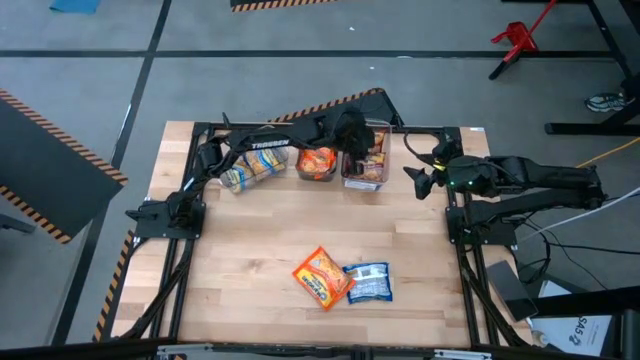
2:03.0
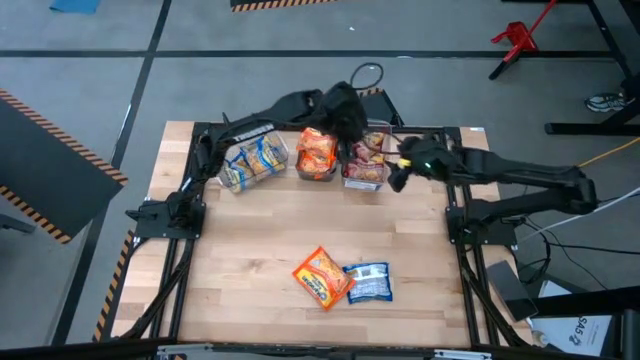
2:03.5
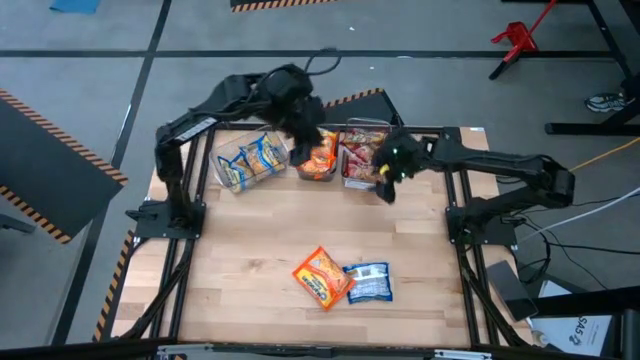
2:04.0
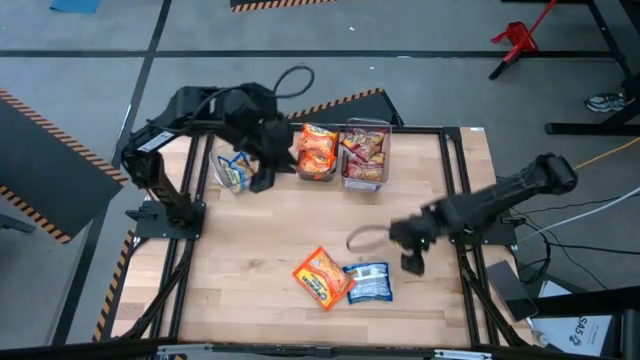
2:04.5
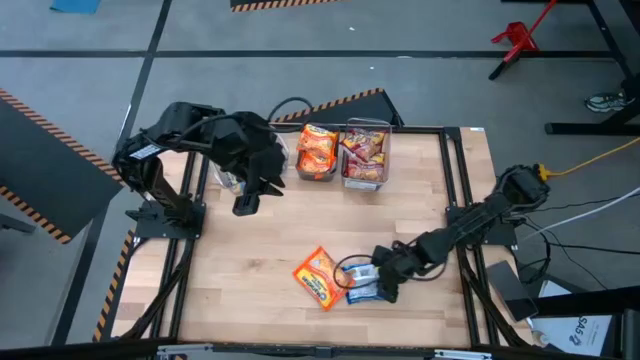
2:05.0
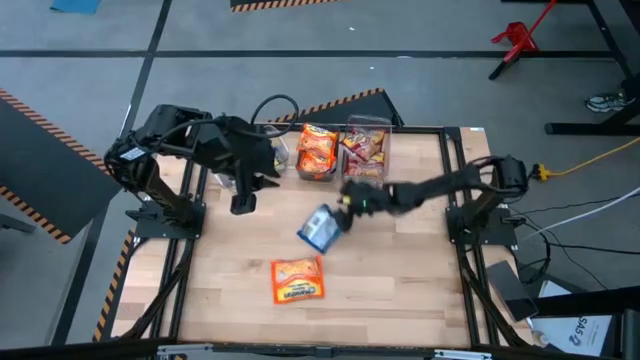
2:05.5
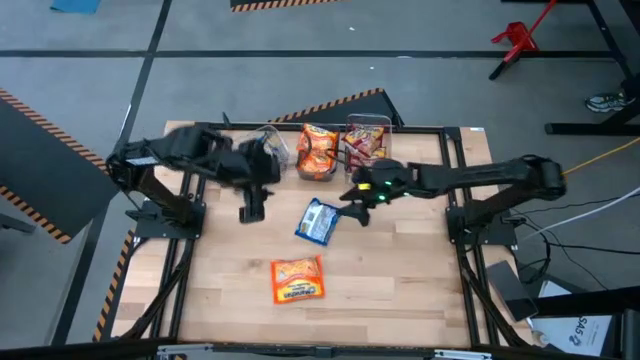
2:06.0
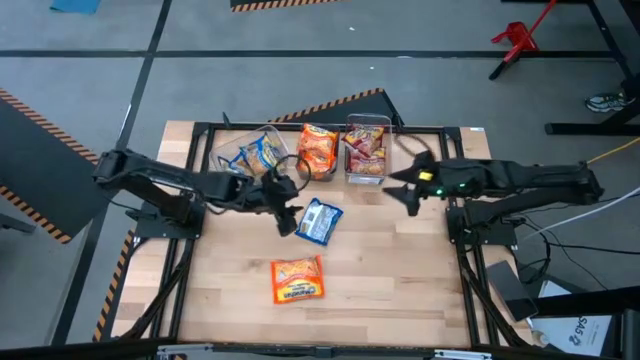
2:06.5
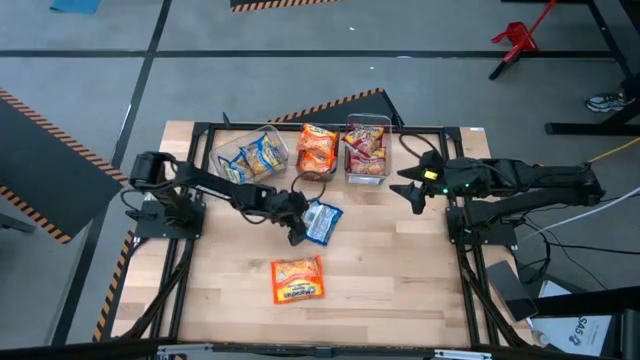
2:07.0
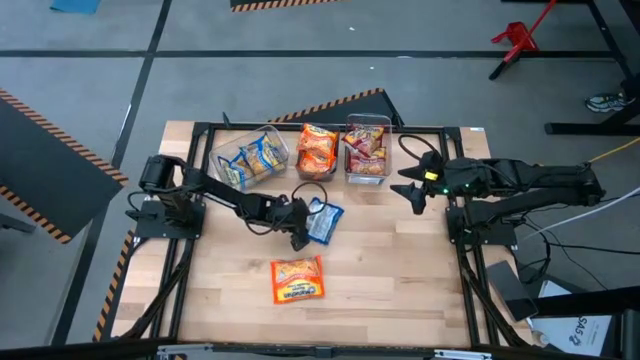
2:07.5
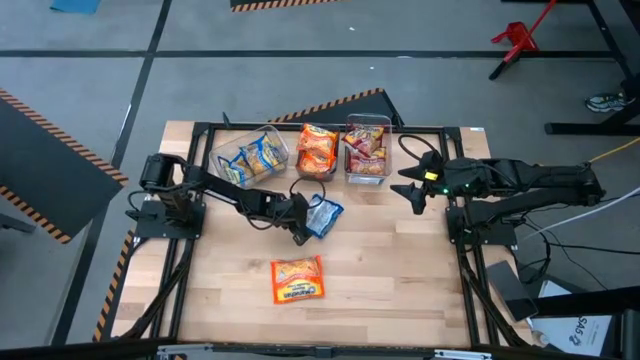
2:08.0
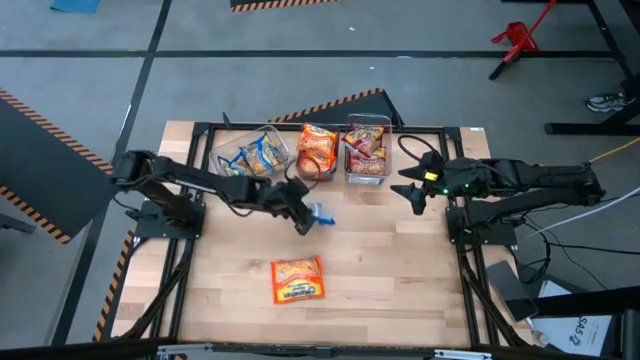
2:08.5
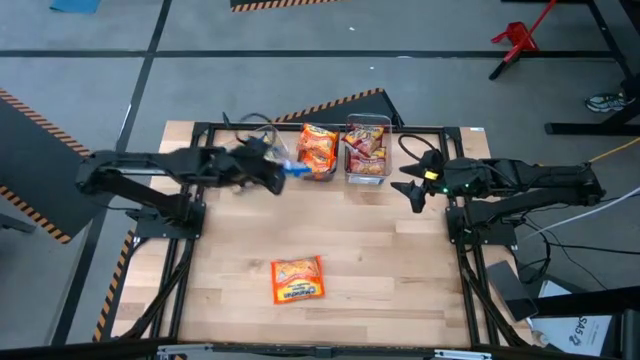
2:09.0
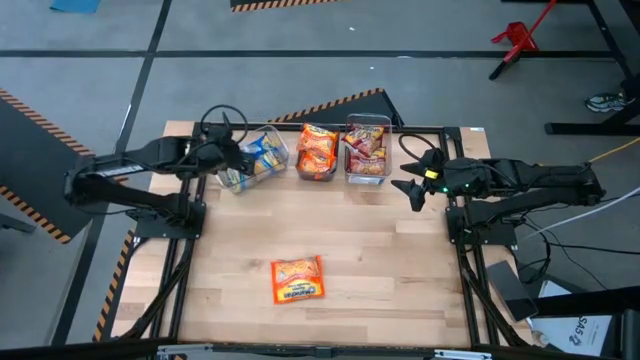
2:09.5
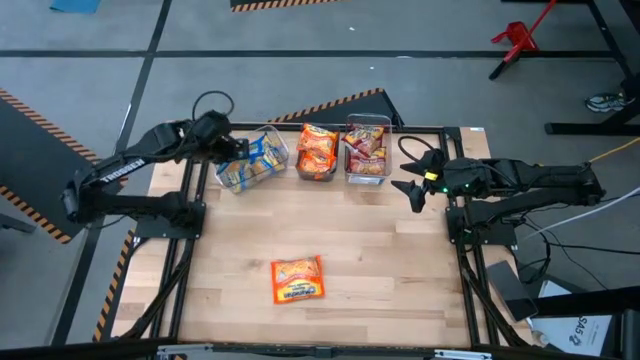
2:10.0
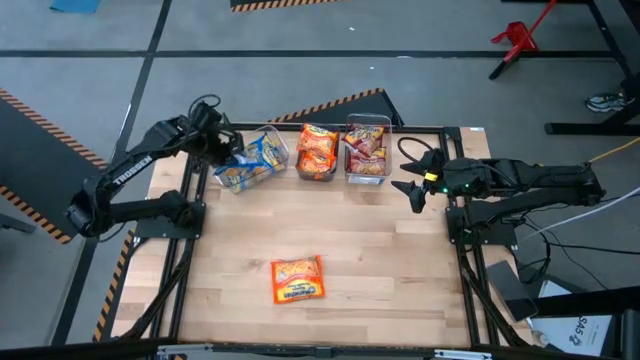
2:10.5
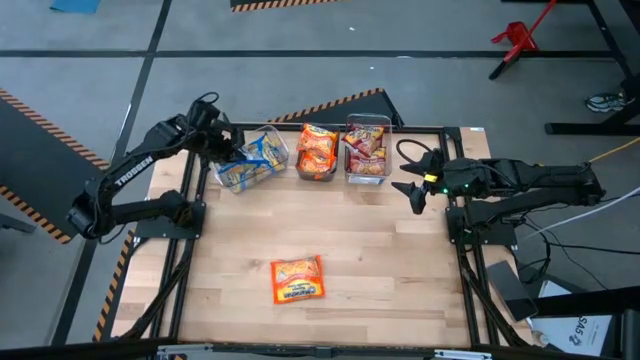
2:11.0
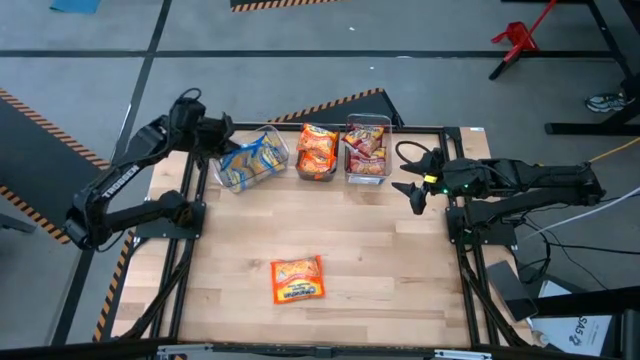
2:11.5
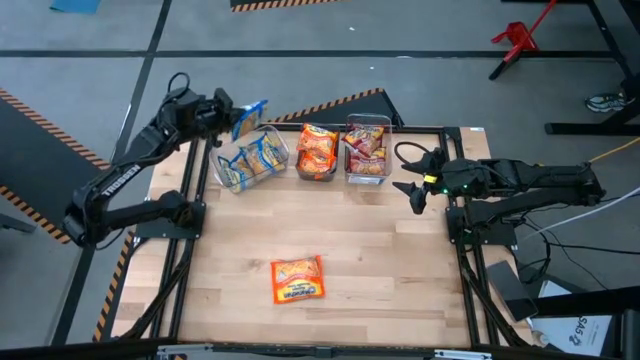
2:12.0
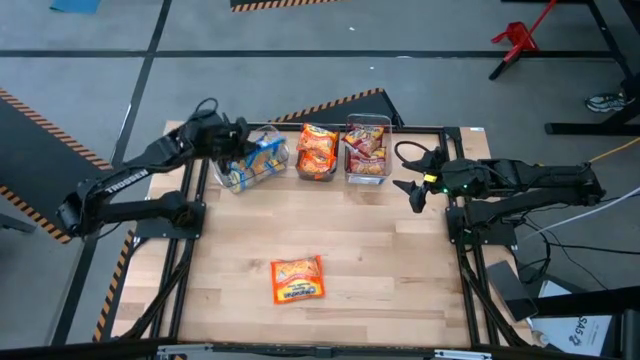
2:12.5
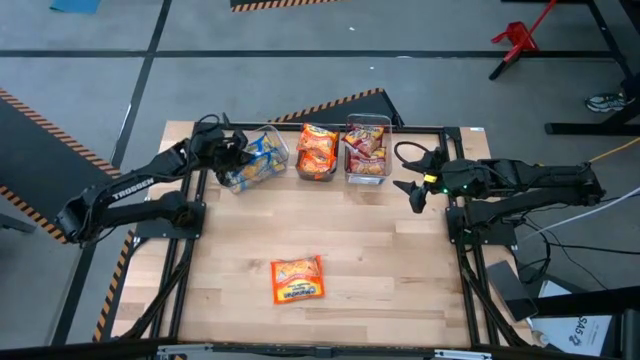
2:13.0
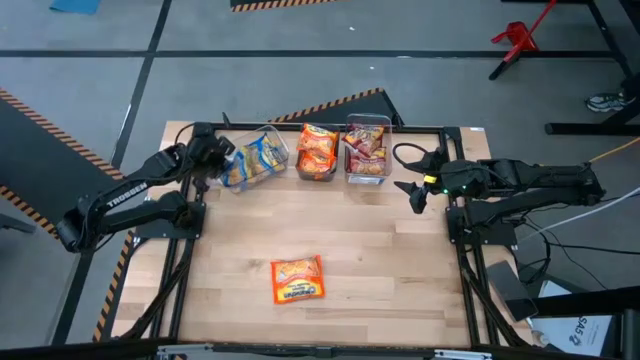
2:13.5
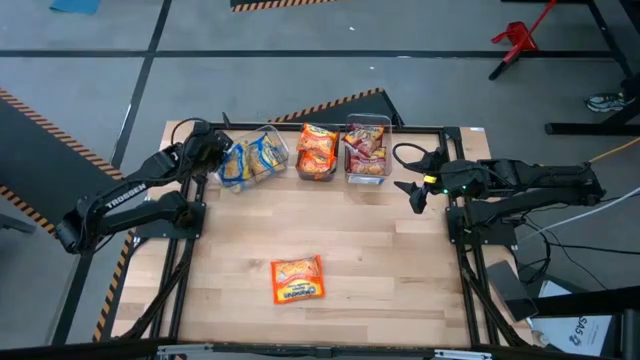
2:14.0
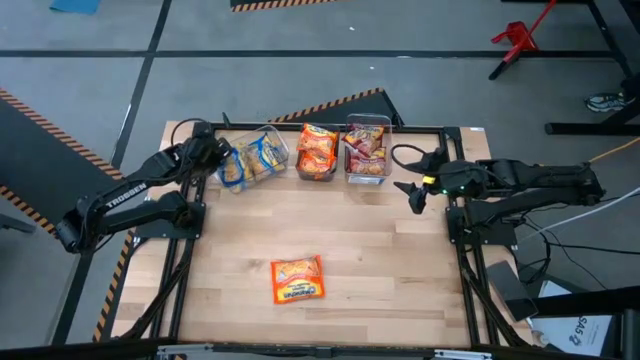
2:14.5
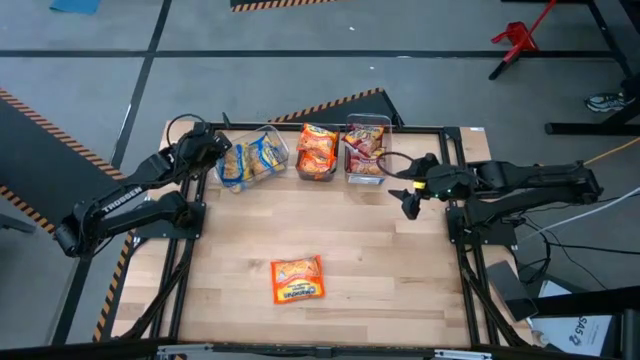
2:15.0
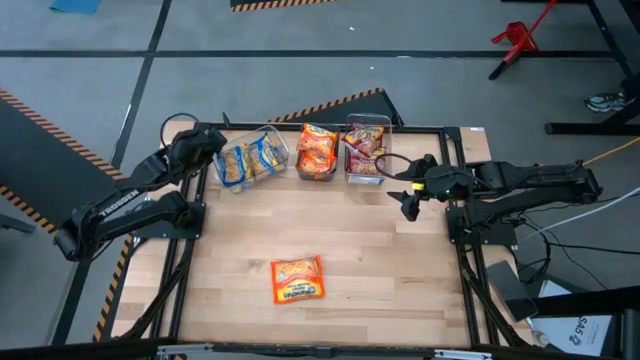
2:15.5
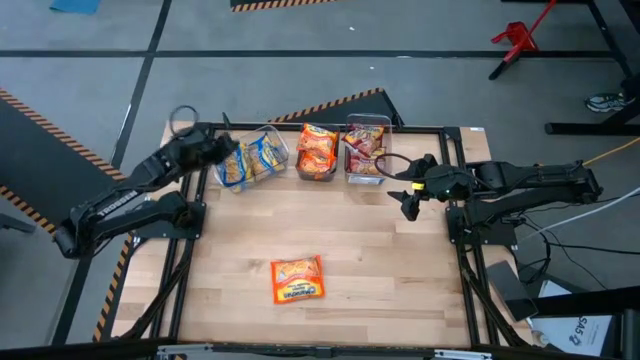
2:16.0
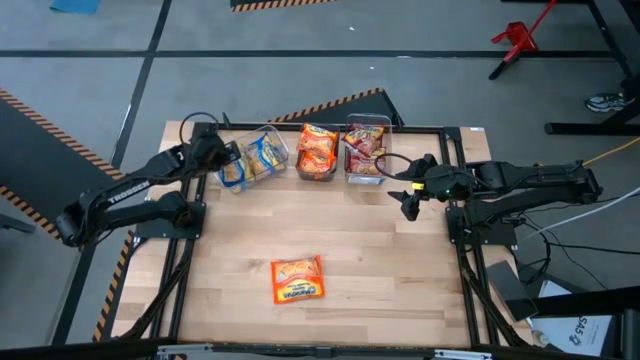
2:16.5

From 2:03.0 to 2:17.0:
Task: Sort Maruchan noodles
Put the blue noodle pack into the left transparent bin

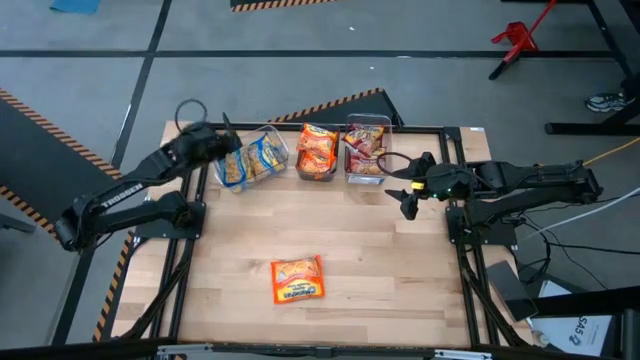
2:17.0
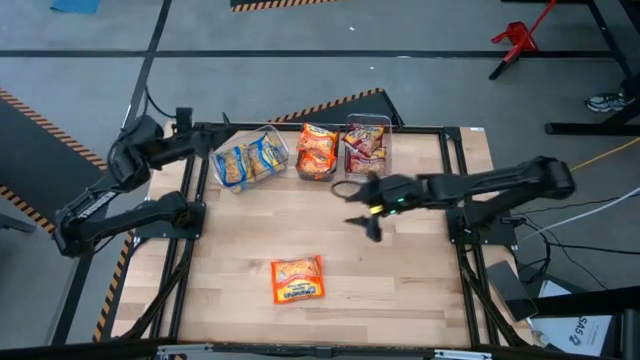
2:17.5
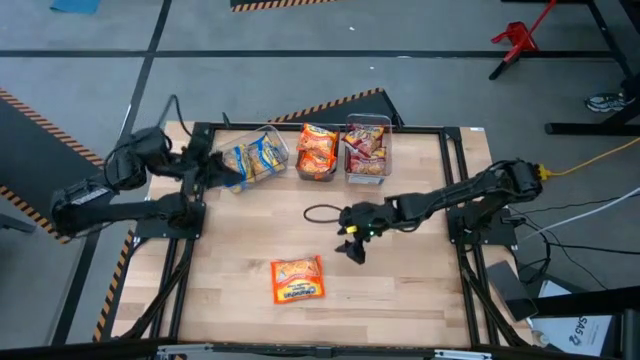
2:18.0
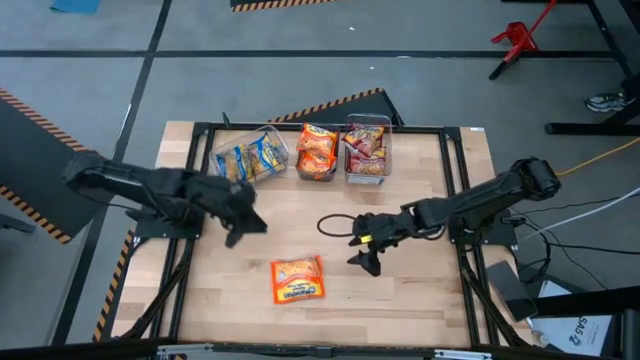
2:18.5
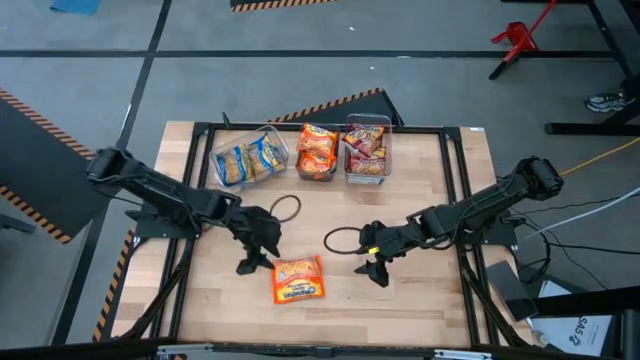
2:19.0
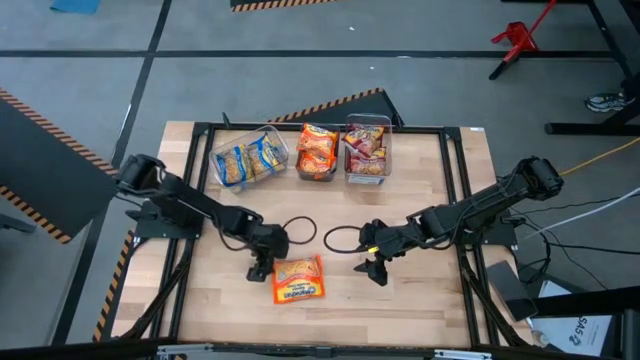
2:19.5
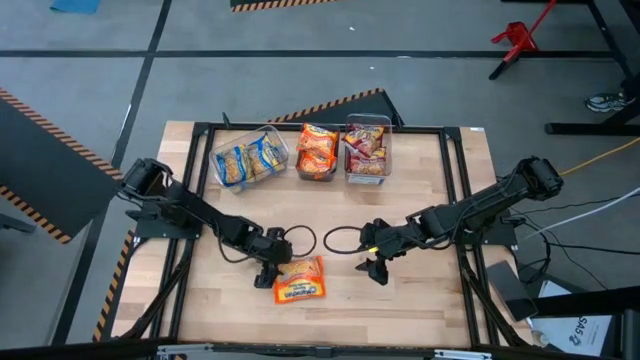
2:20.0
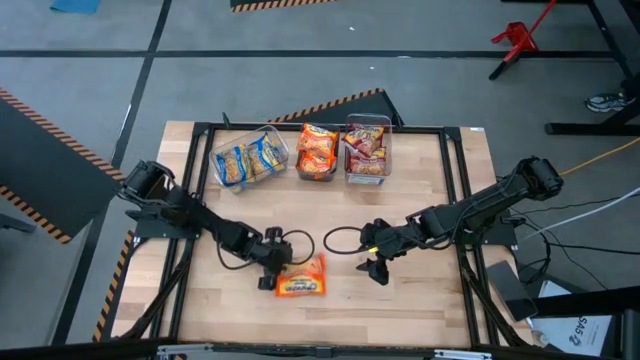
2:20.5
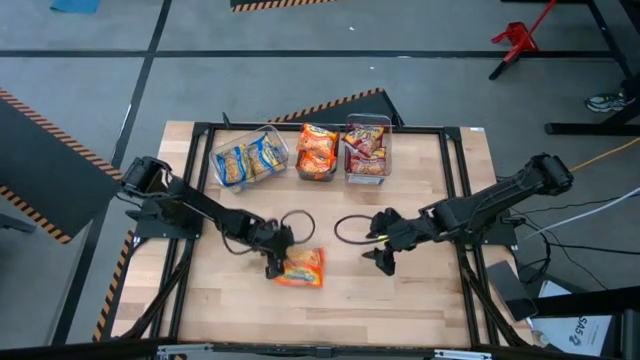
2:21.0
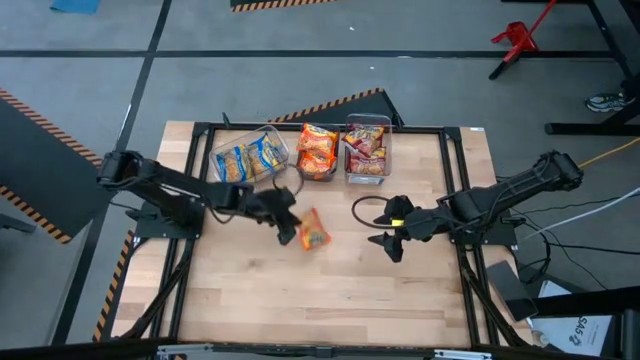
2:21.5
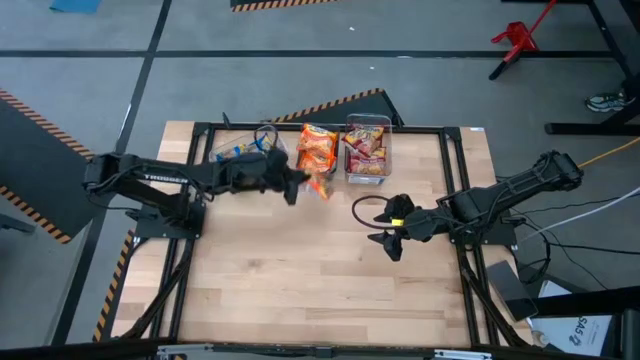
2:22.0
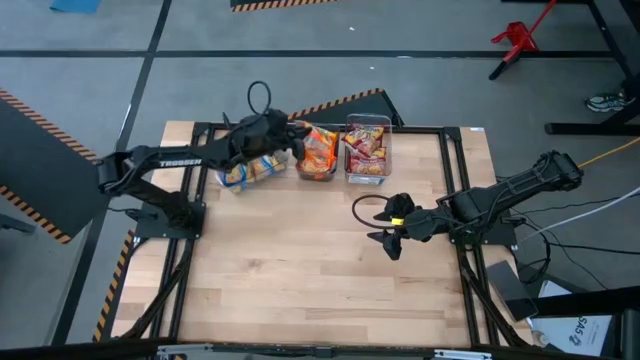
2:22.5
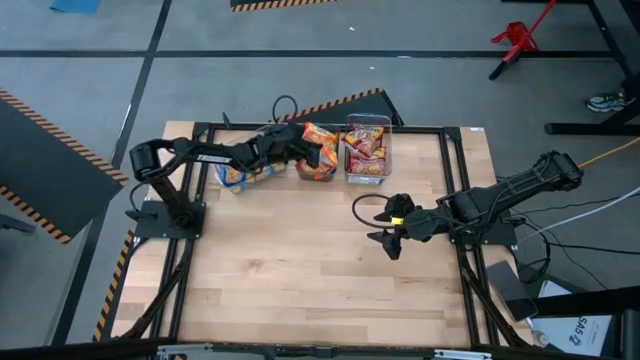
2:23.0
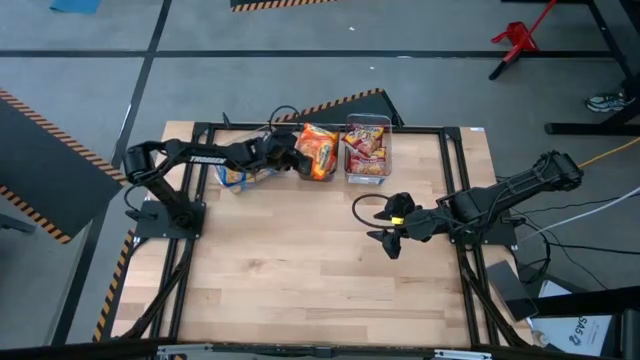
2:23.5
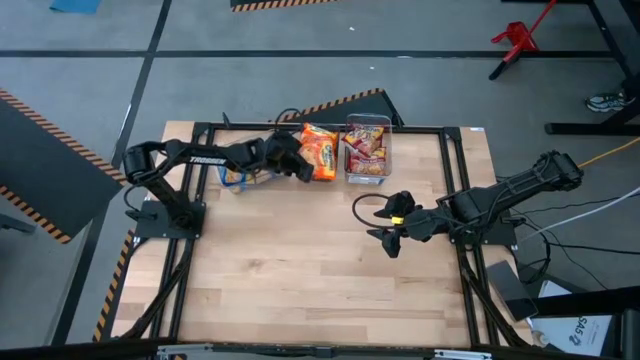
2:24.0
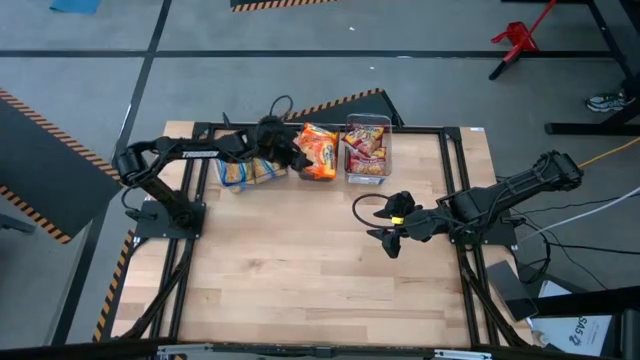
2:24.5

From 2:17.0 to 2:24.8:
Put the orange noodle pack into the black bin
